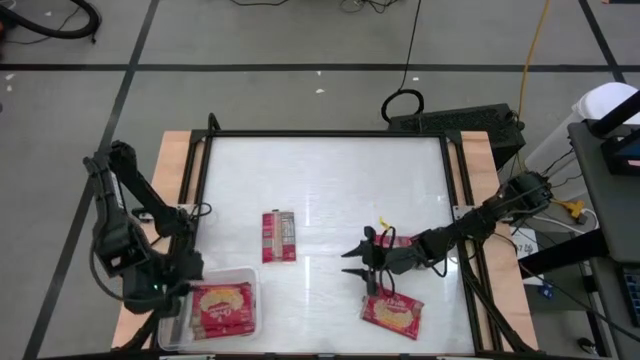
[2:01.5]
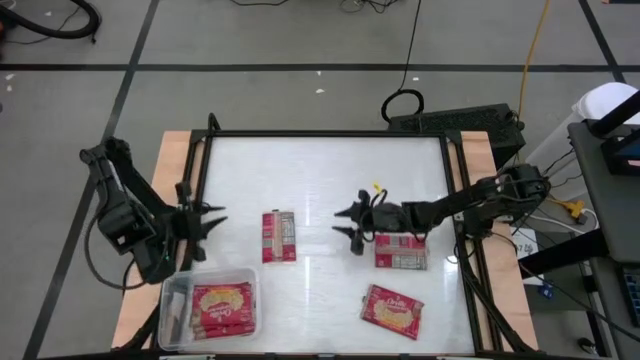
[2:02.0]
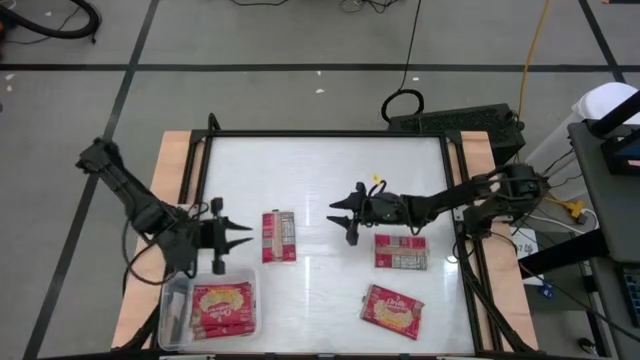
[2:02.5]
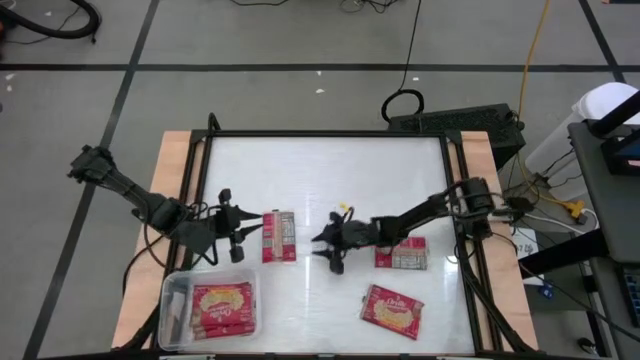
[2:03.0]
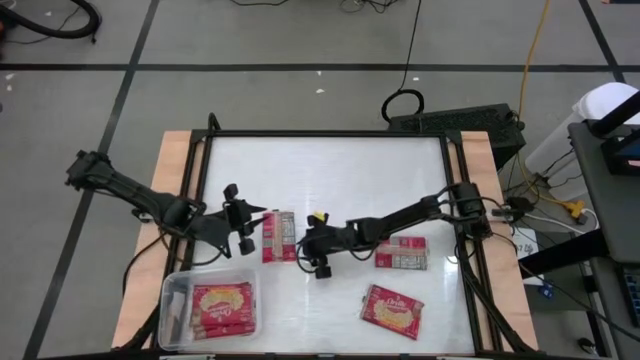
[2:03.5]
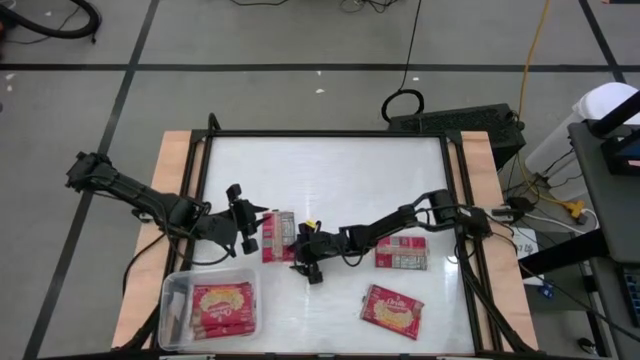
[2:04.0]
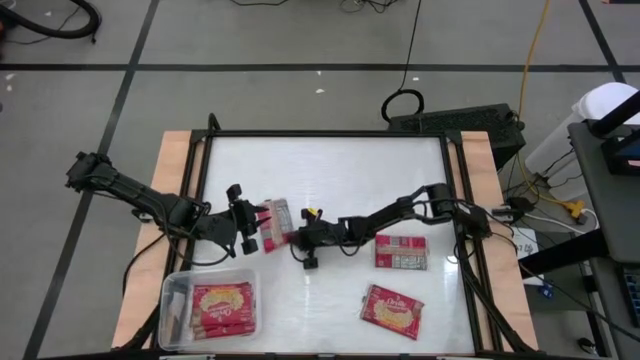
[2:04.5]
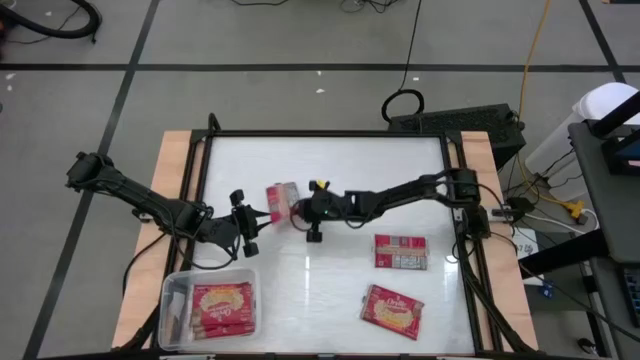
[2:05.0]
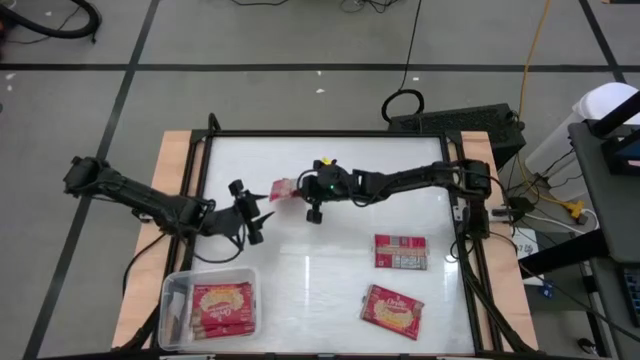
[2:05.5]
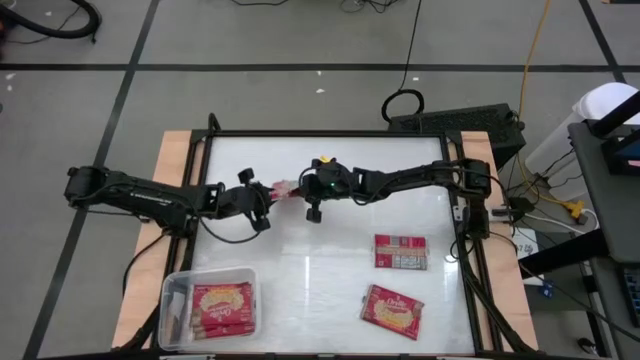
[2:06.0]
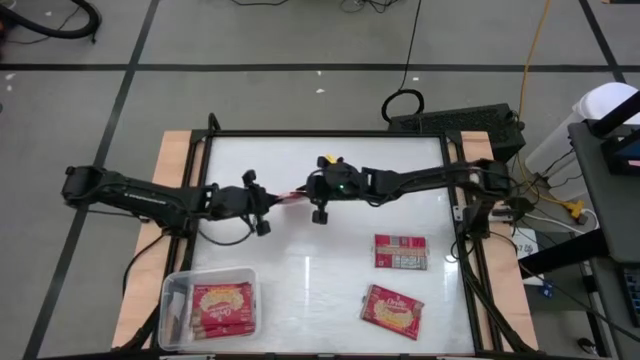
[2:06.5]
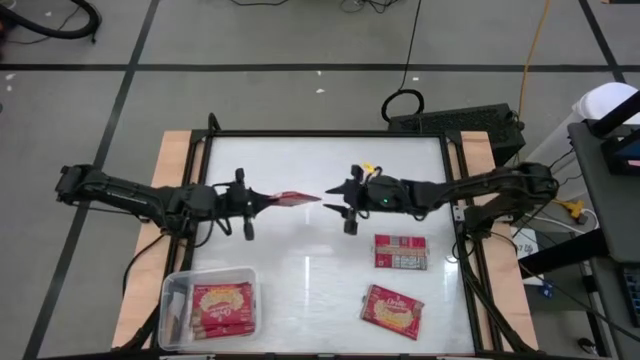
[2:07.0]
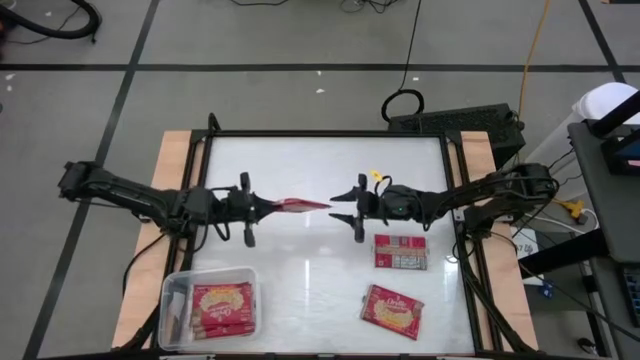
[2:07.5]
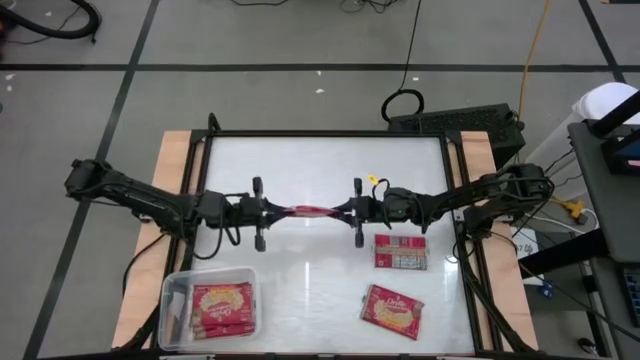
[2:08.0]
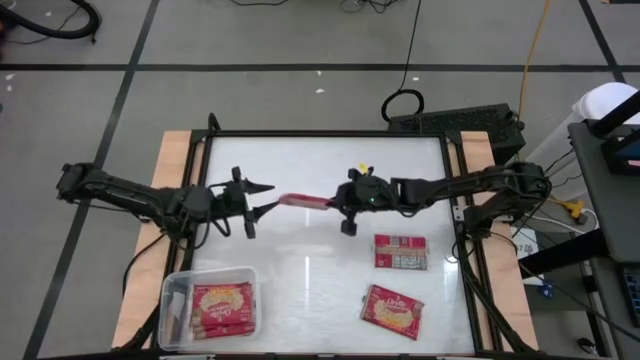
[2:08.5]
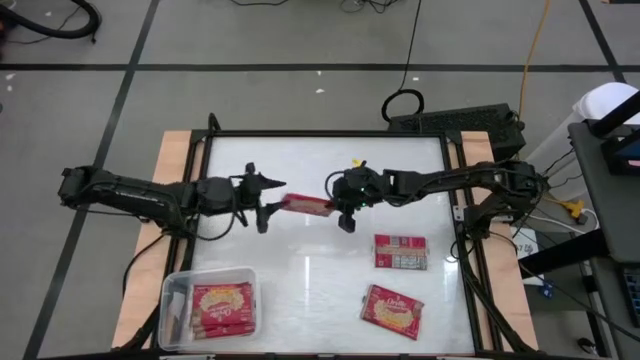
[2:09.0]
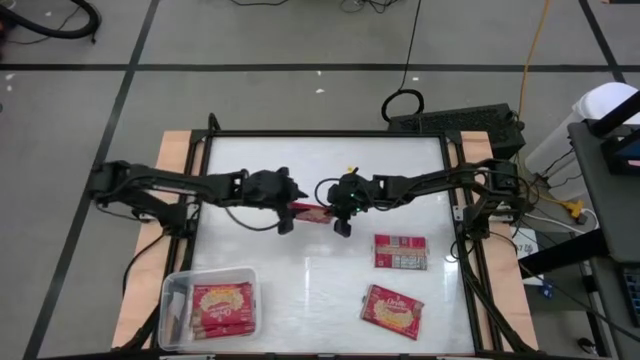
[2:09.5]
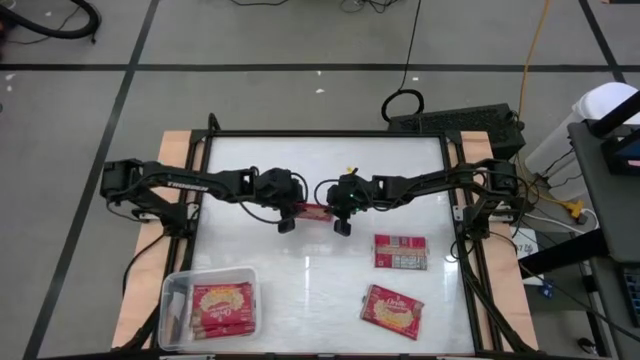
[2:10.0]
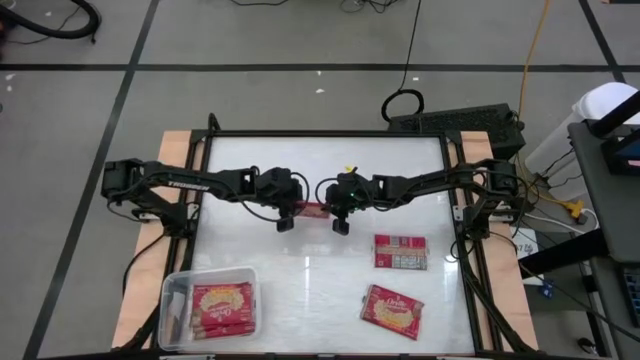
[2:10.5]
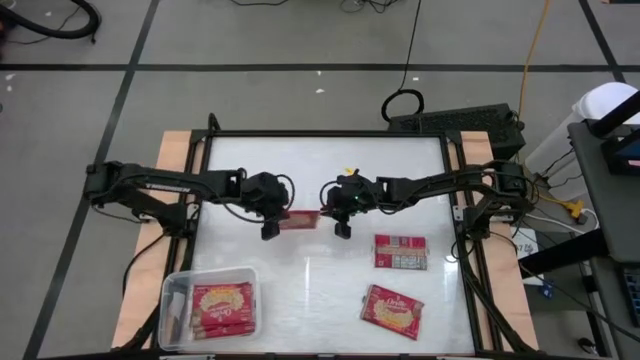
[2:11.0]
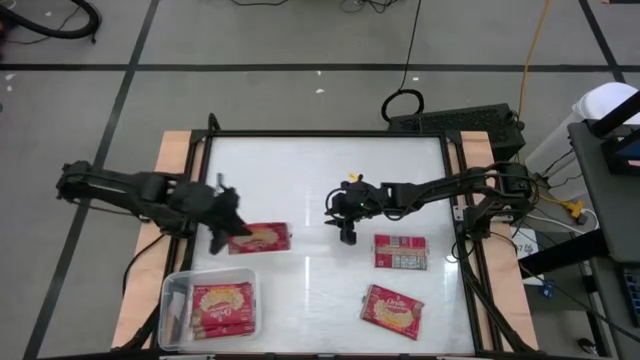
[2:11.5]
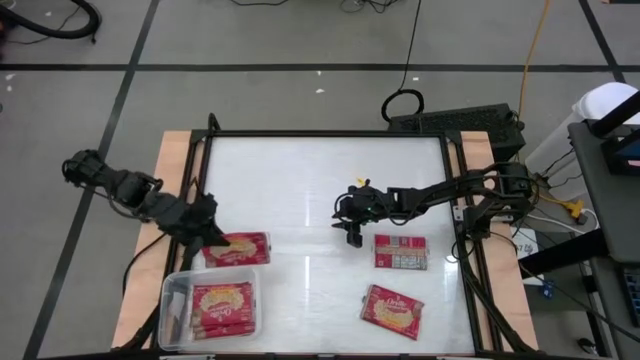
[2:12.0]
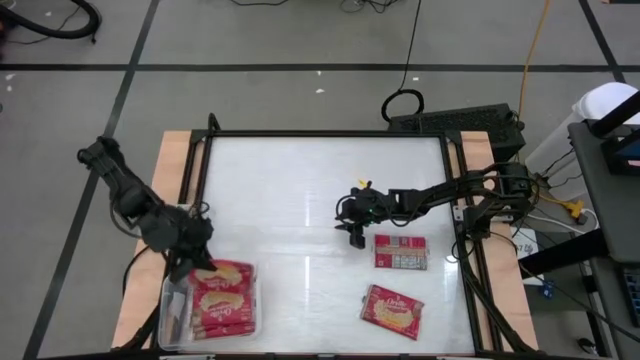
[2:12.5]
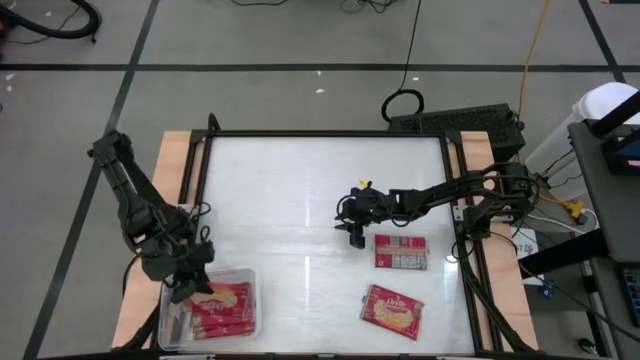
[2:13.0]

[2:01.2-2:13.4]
Task: Sort popcorn bags into baskets
Put the popcorn bag into the transparent bin

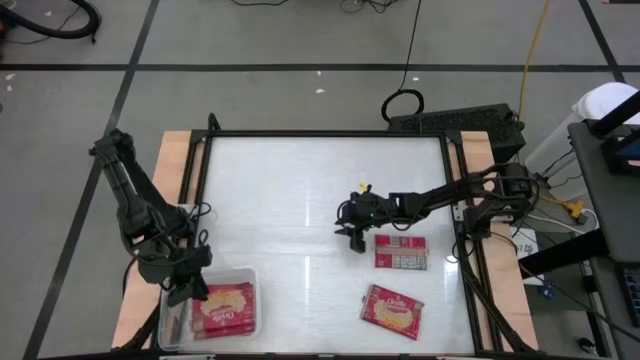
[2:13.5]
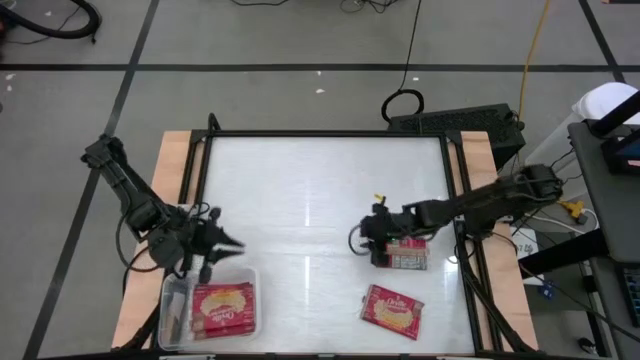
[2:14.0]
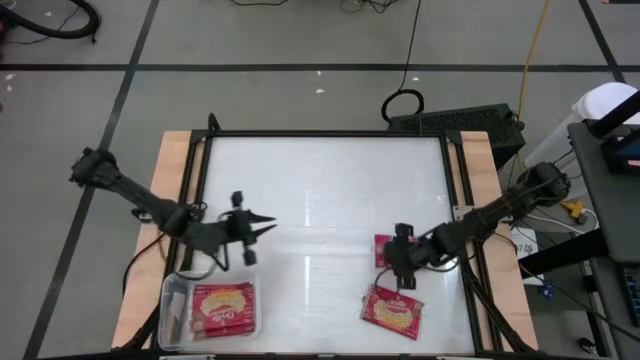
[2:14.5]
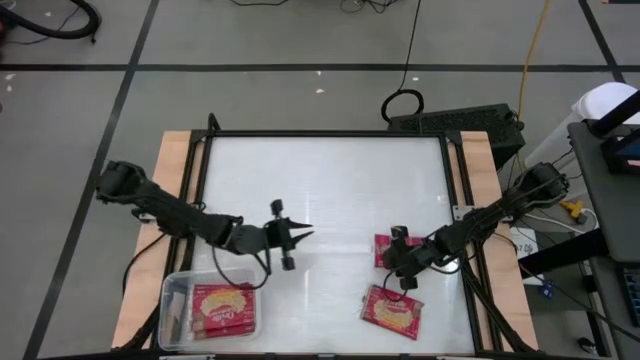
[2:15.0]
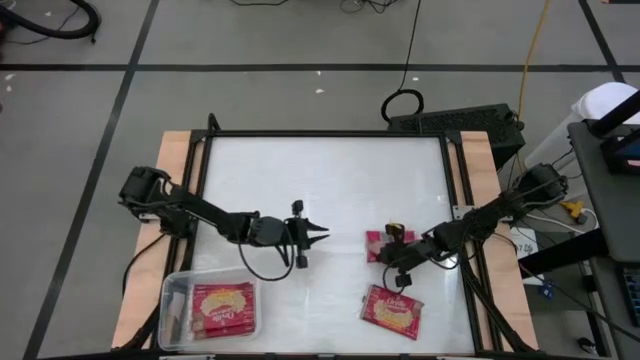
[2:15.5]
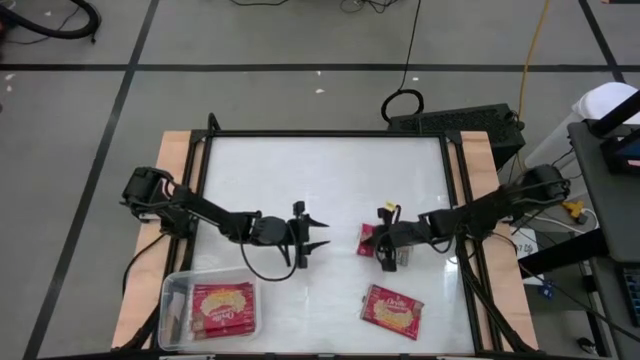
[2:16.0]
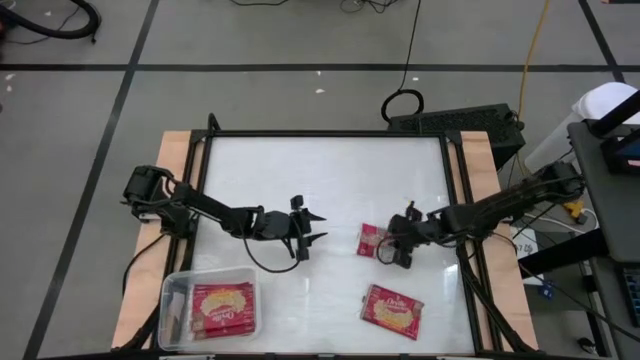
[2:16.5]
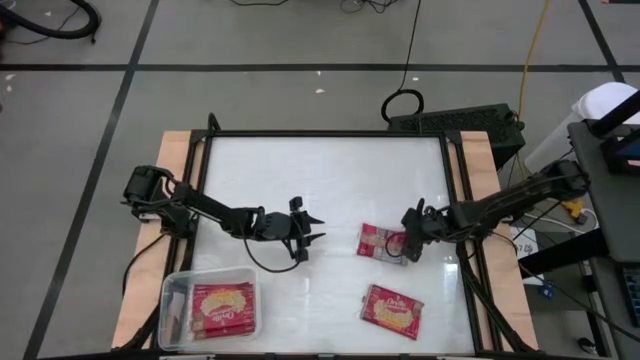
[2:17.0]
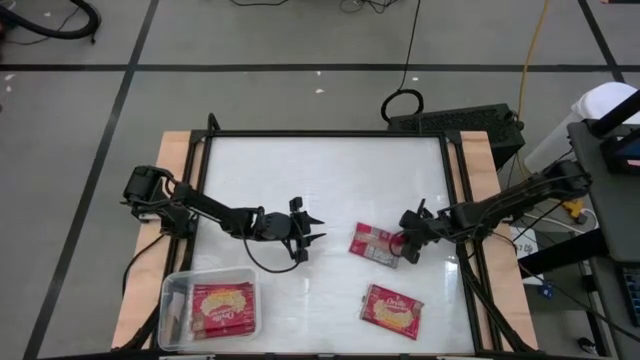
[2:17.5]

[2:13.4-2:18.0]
Put the popcorn bag into the transparent bin

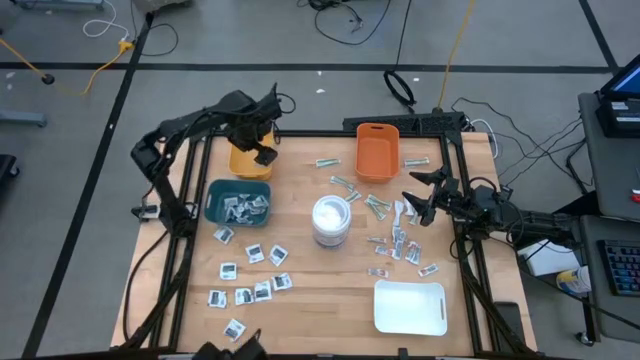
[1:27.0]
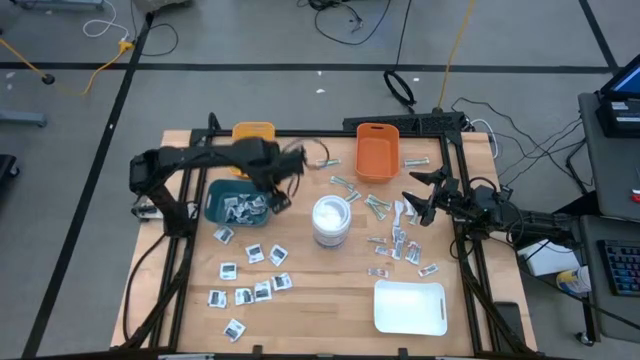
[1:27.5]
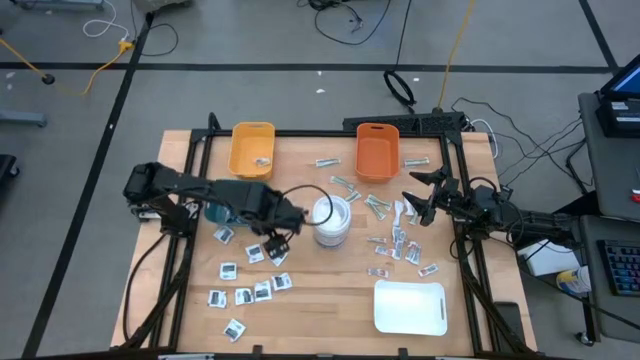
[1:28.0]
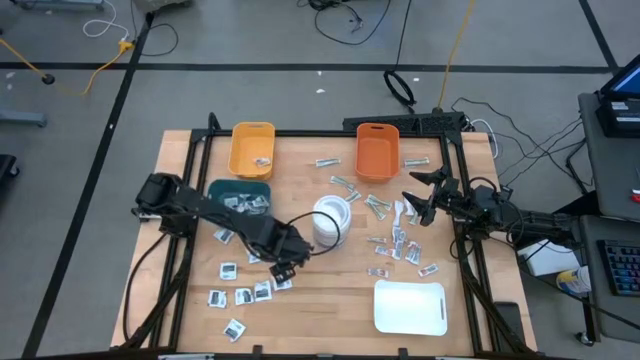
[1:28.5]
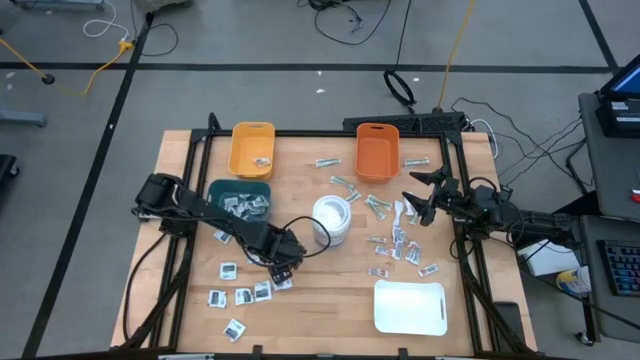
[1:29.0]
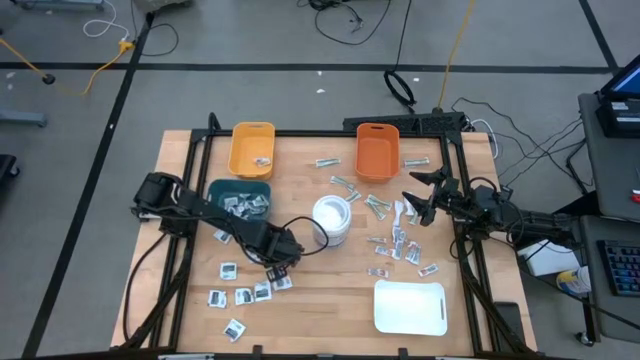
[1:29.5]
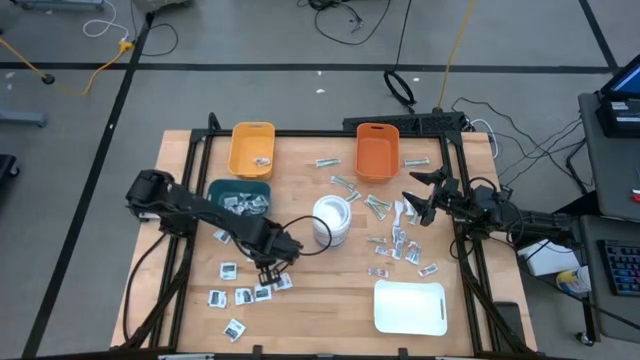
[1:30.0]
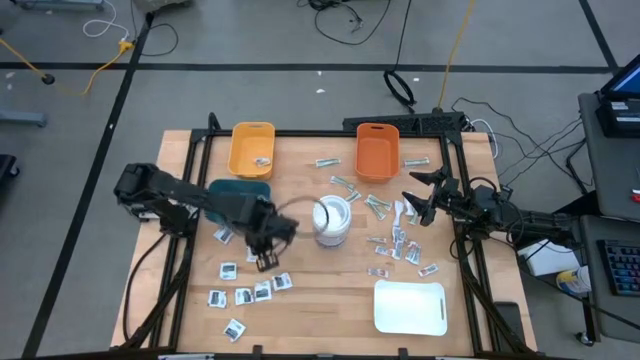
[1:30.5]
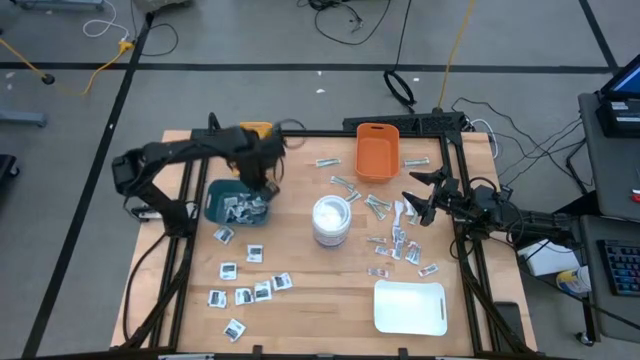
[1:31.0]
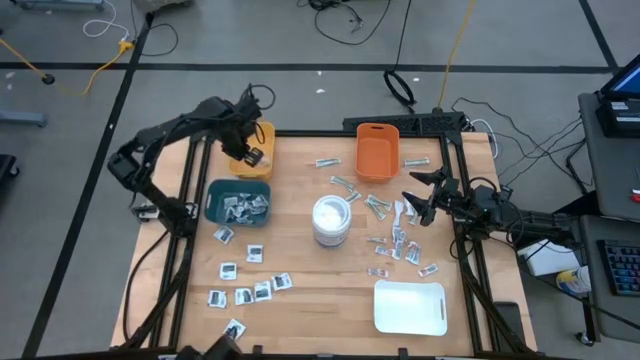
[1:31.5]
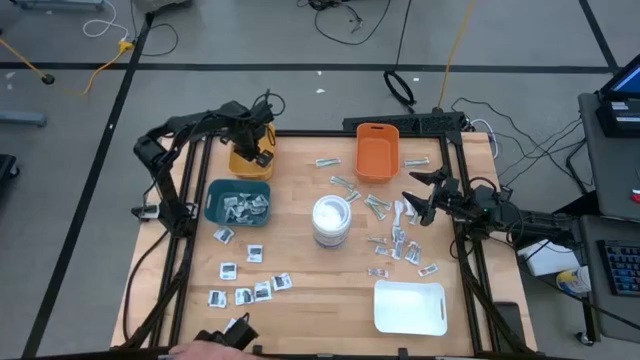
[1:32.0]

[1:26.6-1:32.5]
Task: Pick & Place First Aid Supplies
Put the black pad into the yellow bin
